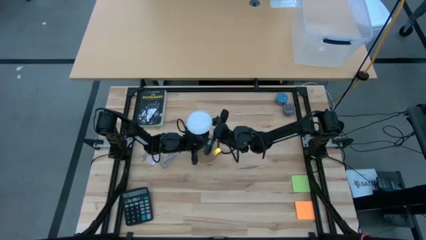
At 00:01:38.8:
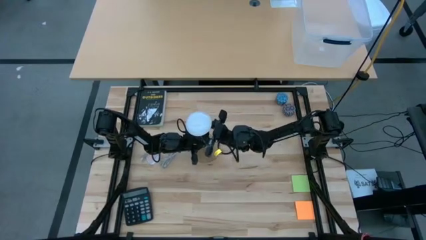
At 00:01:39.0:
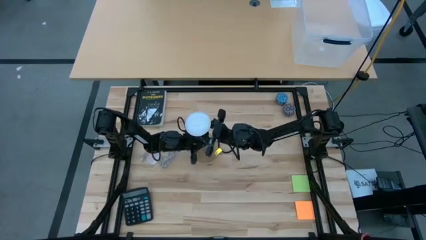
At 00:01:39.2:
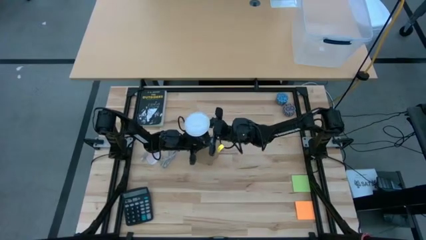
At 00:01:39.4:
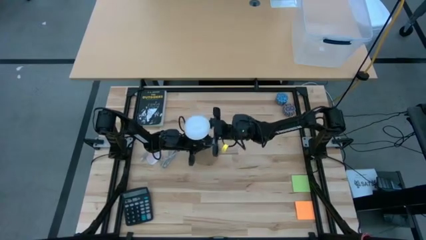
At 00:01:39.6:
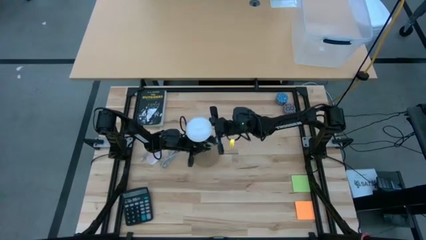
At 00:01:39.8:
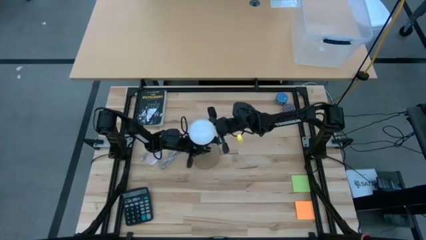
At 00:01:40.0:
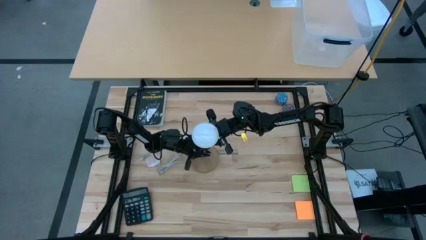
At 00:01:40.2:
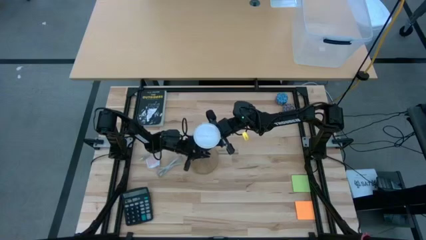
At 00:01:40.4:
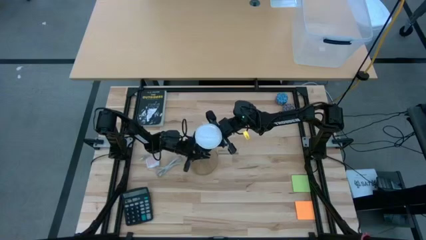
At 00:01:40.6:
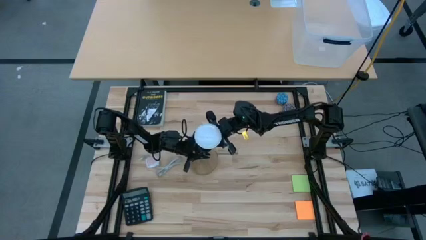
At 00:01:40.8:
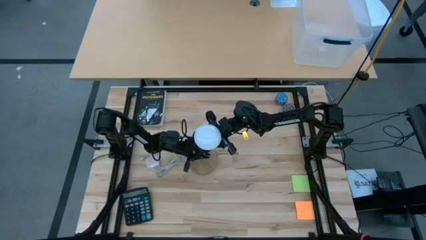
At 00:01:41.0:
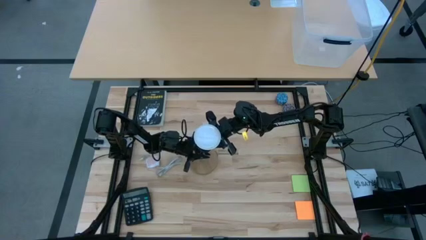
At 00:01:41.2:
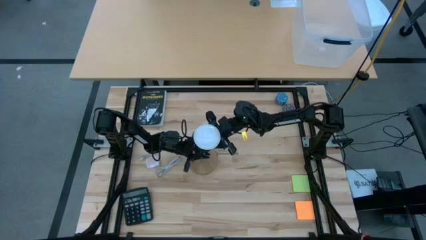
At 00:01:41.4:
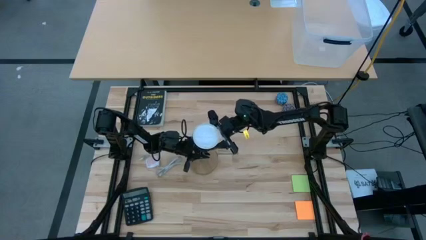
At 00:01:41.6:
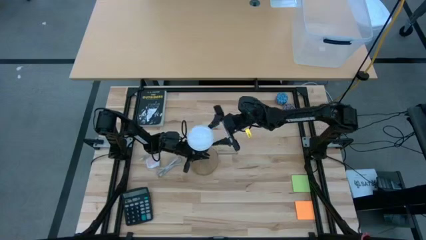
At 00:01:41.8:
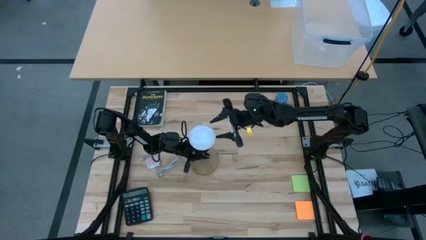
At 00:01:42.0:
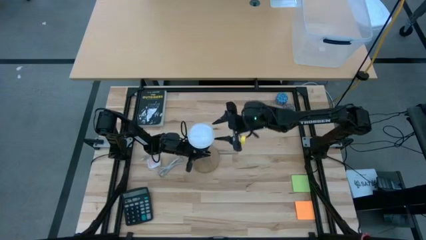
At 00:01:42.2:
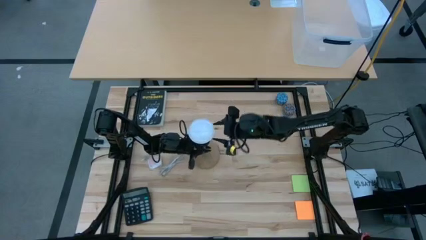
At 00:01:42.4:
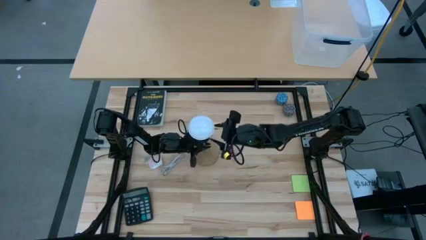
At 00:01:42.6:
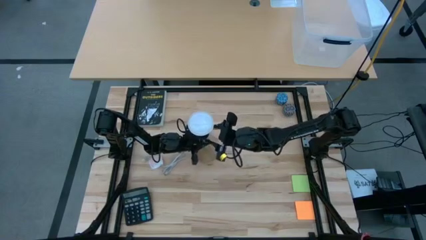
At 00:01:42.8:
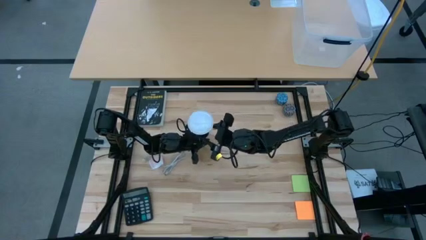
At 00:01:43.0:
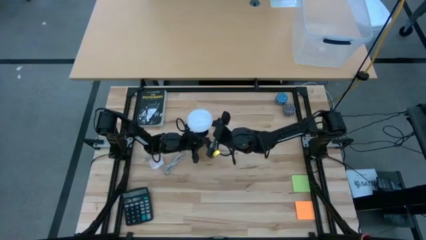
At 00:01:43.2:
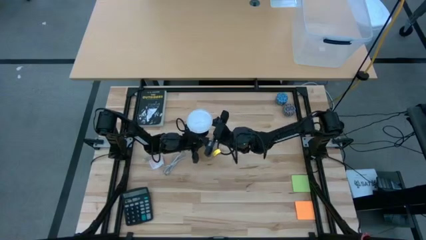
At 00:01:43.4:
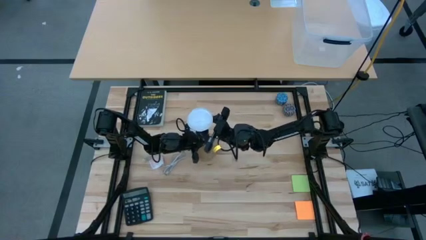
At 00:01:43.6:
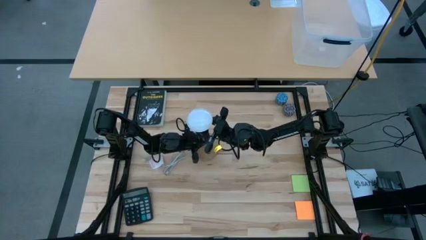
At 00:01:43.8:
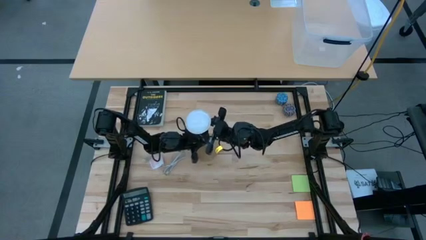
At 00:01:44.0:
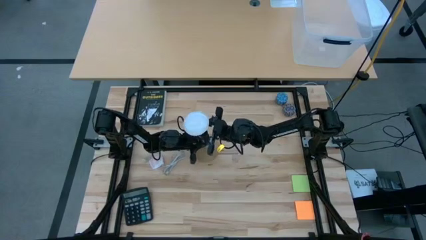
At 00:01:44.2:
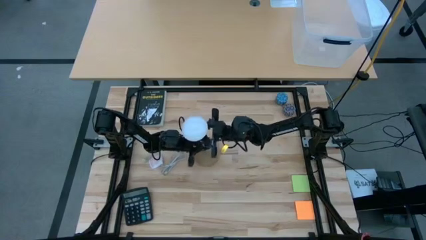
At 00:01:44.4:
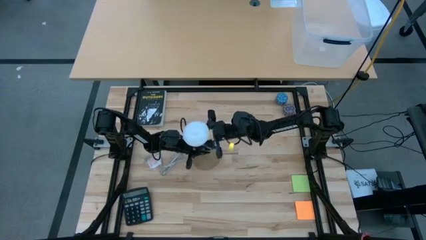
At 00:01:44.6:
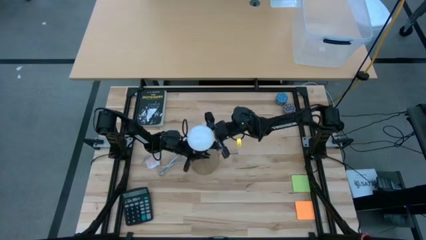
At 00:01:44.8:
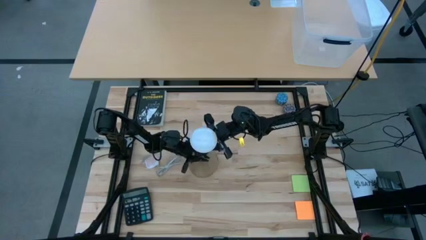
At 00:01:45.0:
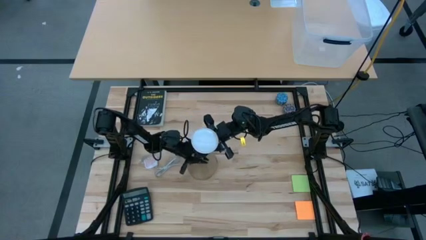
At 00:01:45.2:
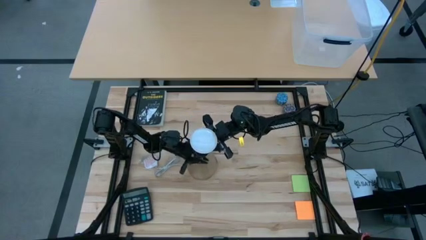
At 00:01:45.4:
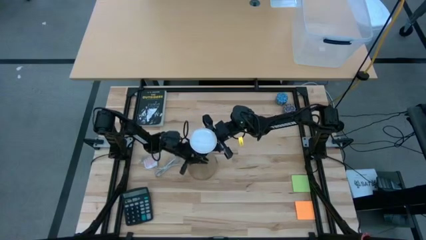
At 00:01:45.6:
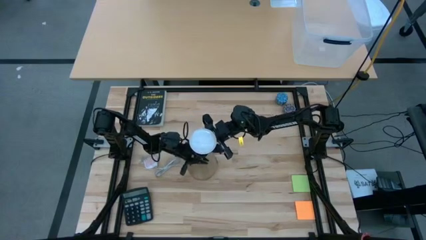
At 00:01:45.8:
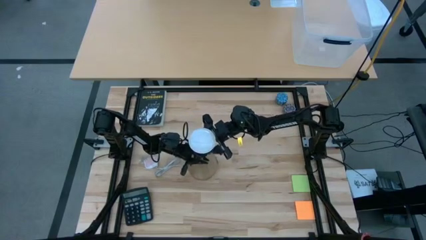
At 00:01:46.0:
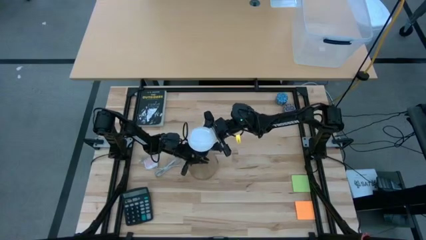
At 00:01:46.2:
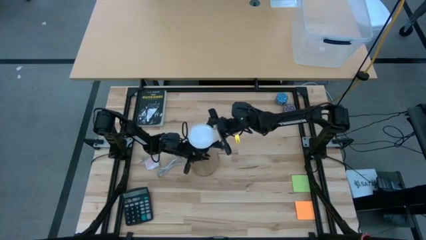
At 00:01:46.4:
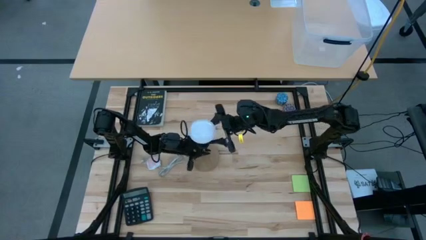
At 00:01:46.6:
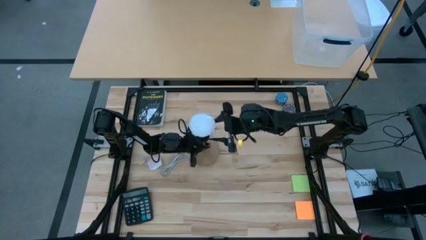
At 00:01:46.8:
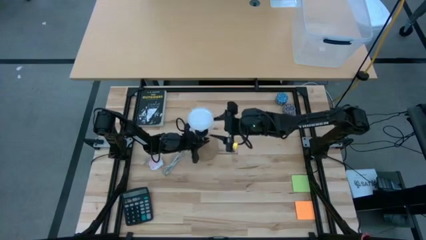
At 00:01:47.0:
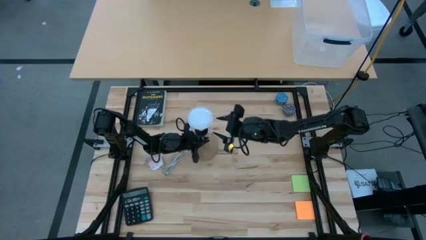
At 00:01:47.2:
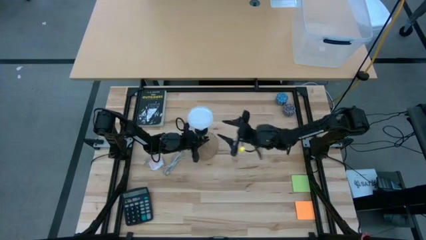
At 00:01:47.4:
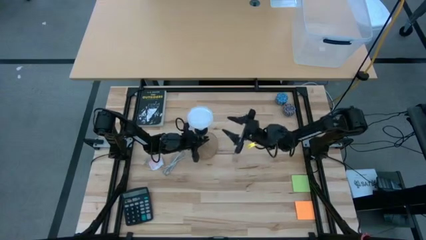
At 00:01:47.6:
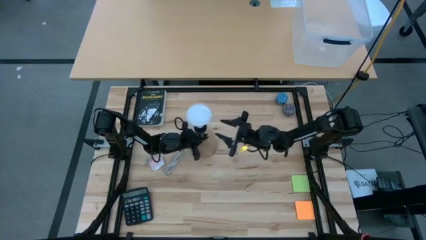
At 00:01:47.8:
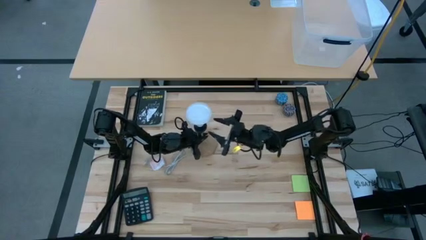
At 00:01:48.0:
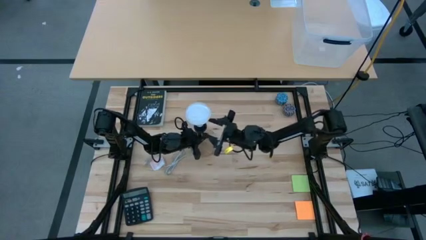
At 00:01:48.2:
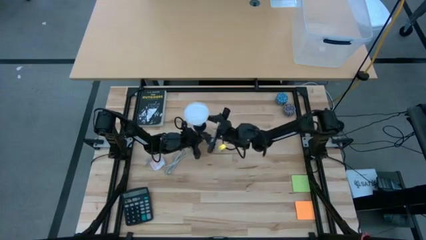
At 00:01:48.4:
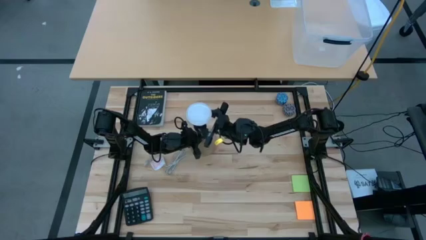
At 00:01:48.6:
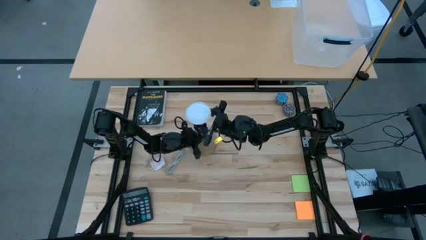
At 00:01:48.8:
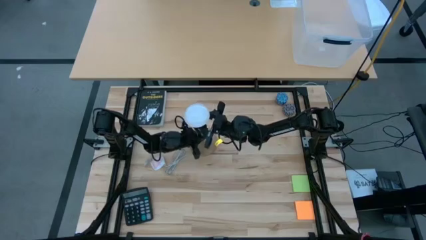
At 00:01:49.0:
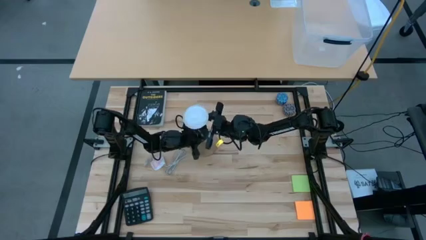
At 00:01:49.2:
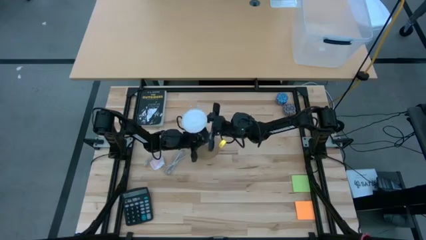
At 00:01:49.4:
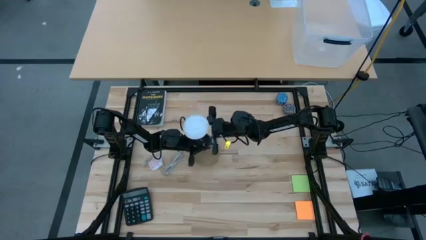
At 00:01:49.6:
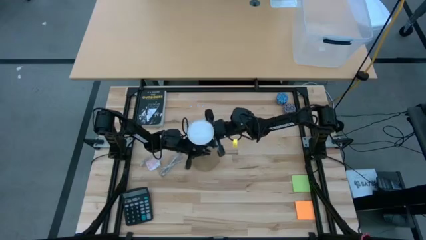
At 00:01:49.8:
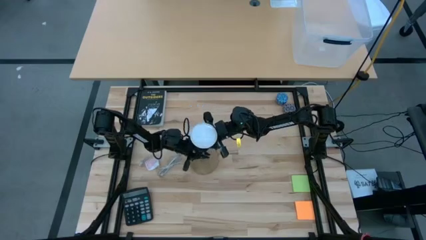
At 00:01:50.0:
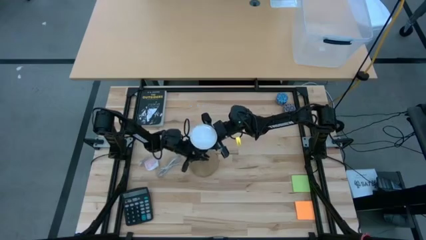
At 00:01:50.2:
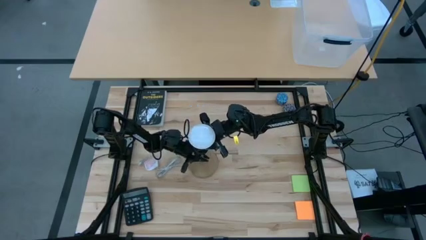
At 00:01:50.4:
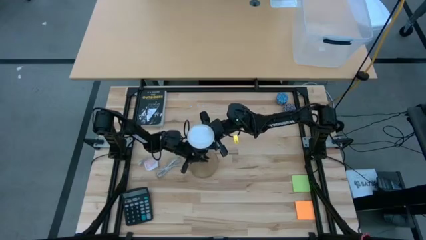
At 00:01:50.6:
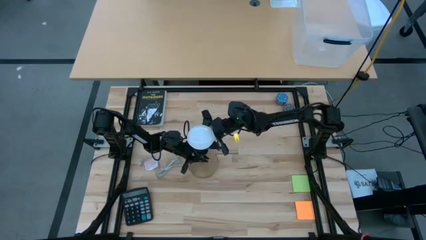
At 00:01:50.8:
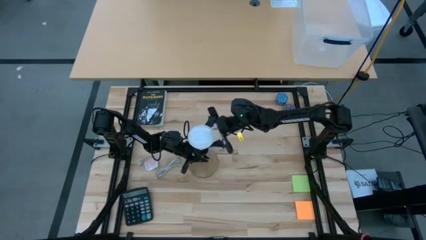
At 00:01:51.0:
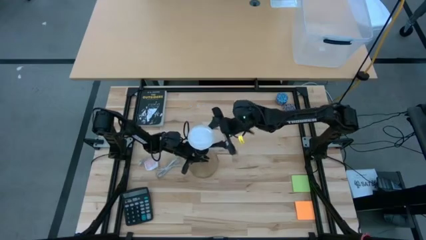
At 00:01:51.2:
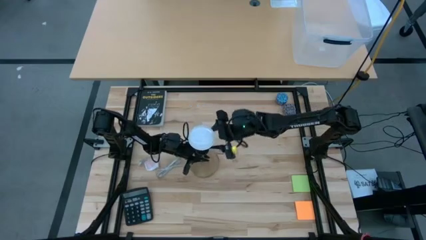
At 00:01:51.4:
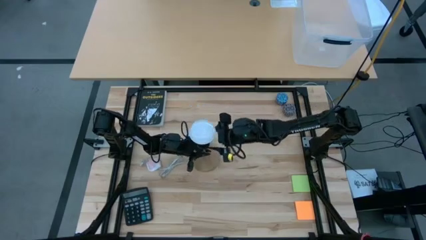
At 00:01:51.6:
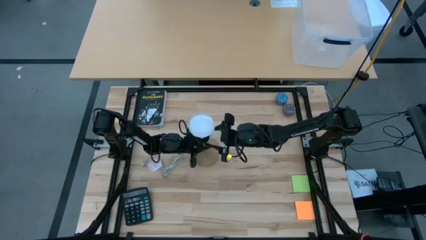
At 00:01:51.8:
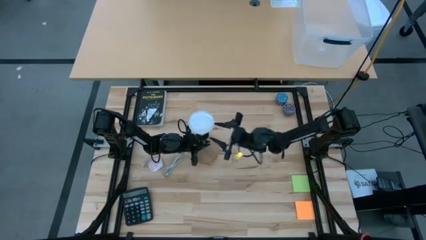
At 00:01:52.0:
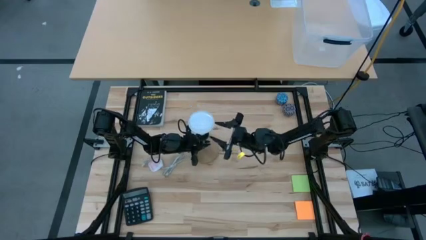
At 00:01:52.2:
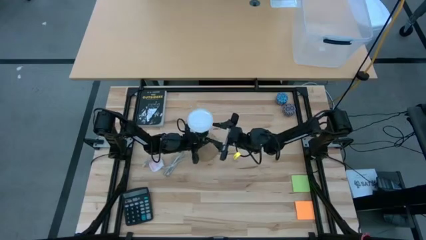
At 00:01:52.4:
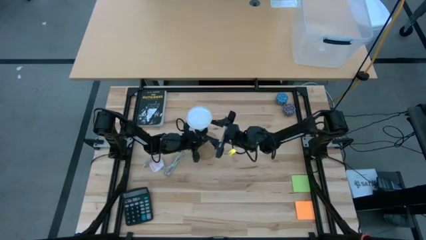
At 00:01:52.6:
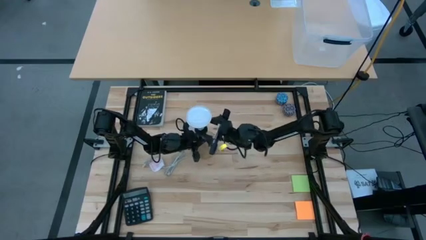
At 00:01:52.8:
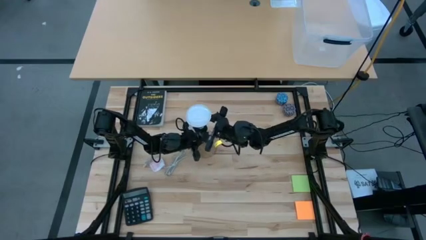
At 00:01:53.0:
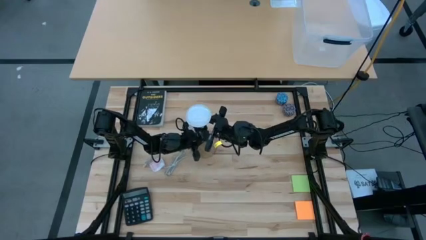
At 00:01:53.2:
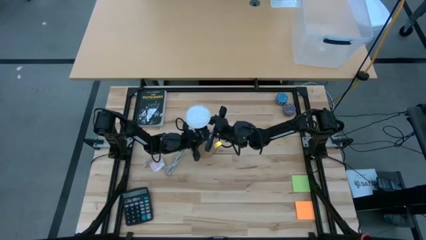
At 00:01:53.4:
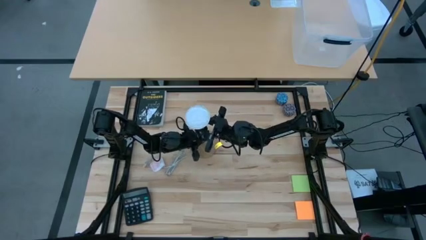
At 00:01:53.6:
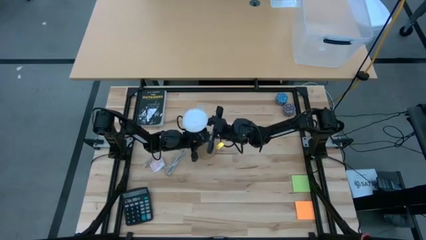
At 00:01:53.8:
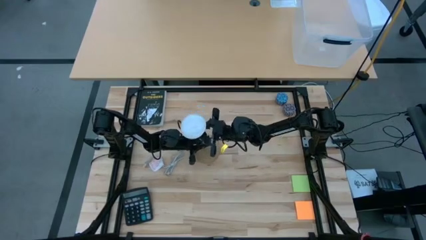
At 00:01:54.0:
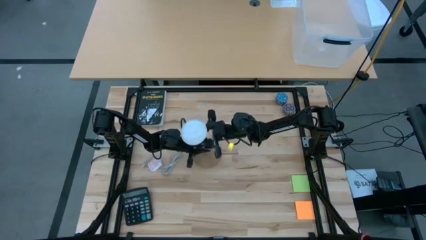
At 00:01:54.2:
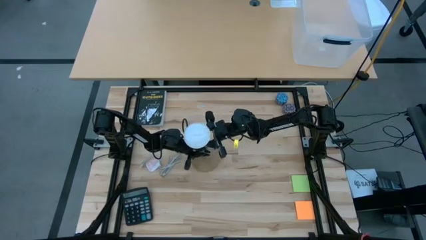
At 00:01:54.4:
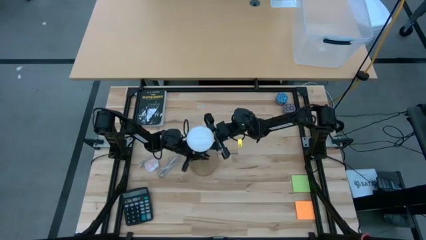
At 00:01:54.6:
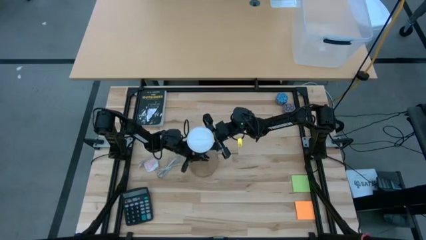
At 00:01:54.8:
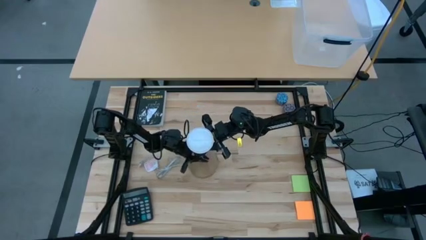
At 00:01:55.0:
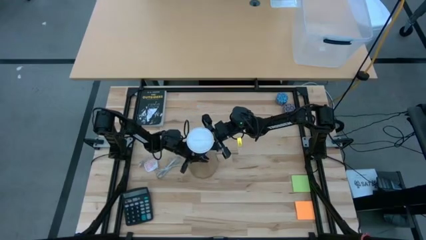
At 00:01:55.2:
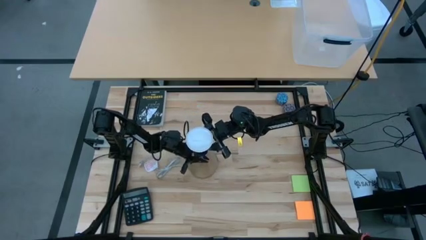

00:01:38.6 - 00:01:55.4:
Task: Screw lightbulb
Remove the lightbulb from the lamp socket
